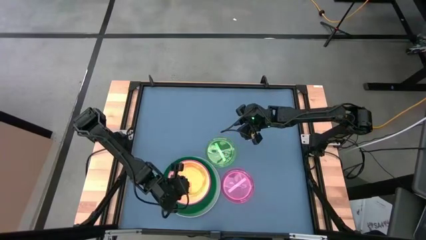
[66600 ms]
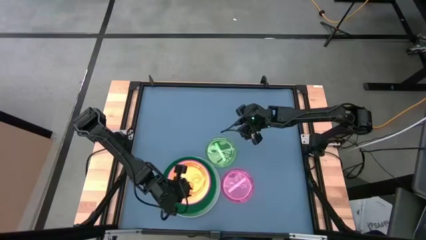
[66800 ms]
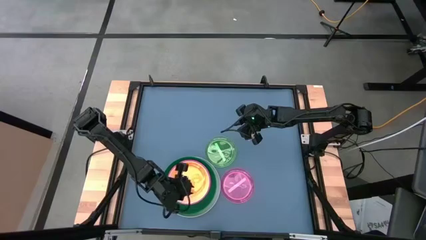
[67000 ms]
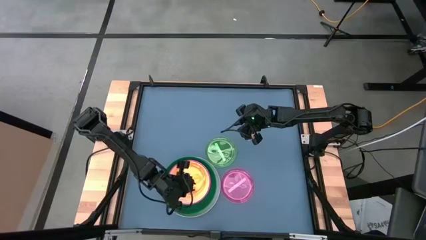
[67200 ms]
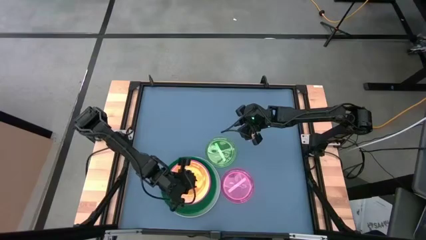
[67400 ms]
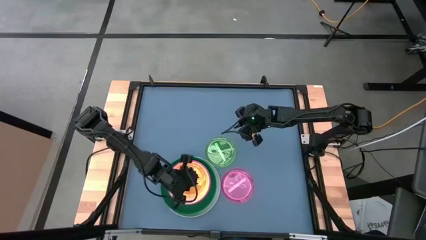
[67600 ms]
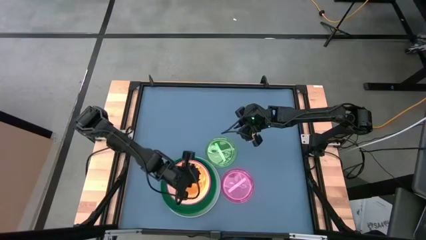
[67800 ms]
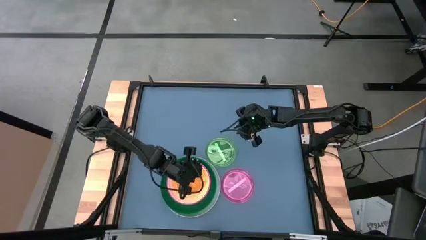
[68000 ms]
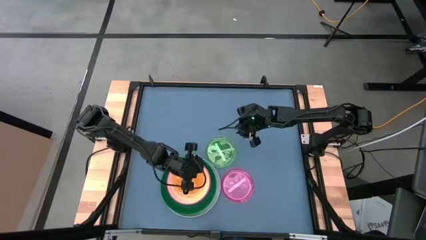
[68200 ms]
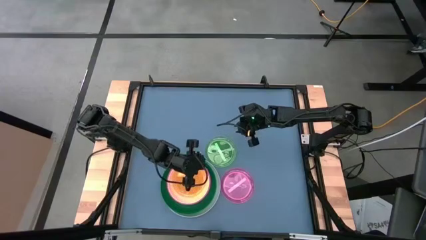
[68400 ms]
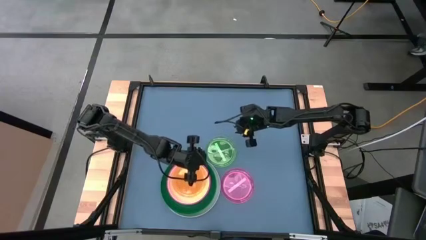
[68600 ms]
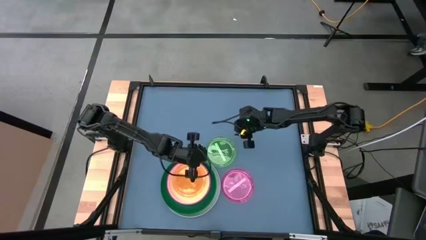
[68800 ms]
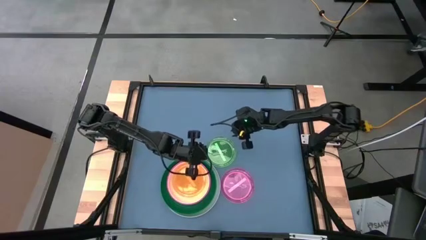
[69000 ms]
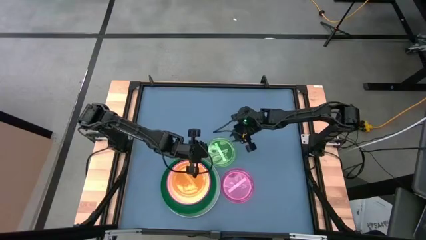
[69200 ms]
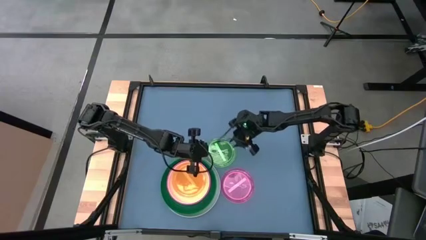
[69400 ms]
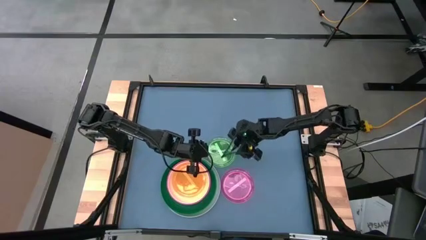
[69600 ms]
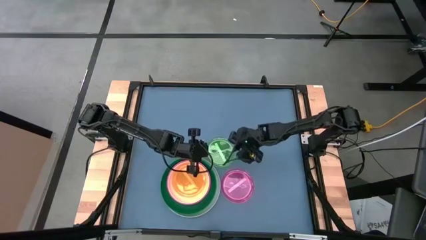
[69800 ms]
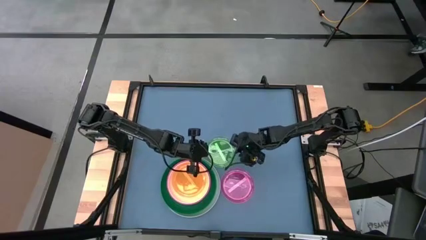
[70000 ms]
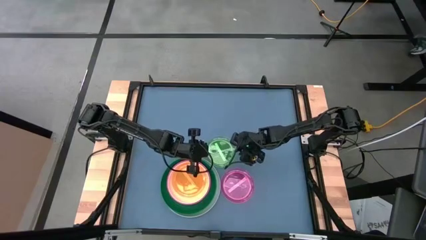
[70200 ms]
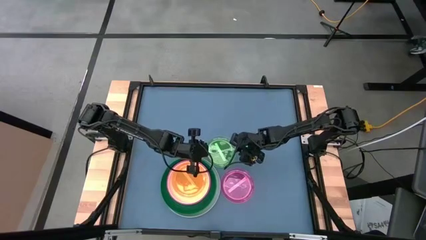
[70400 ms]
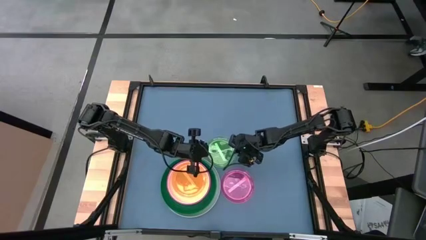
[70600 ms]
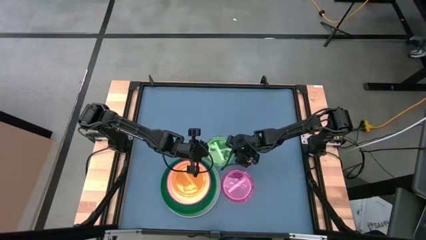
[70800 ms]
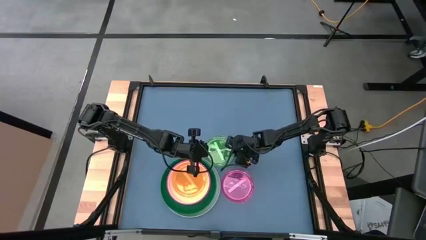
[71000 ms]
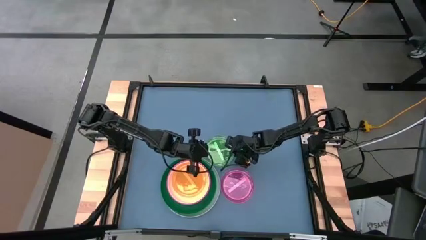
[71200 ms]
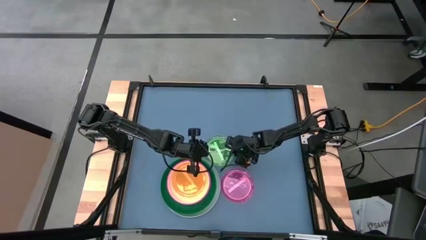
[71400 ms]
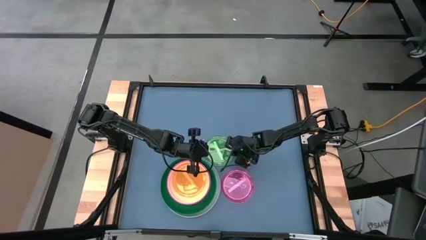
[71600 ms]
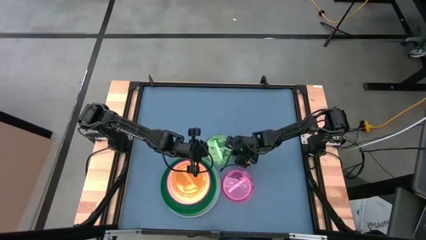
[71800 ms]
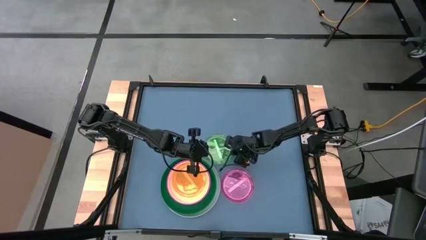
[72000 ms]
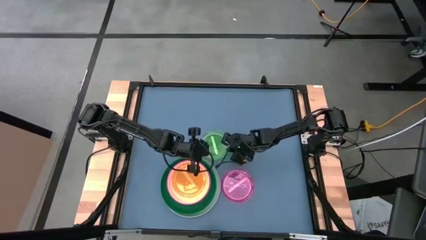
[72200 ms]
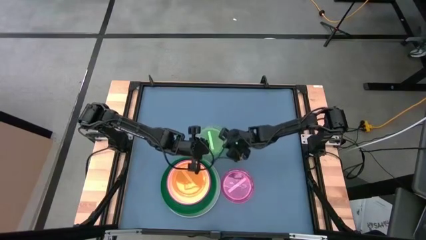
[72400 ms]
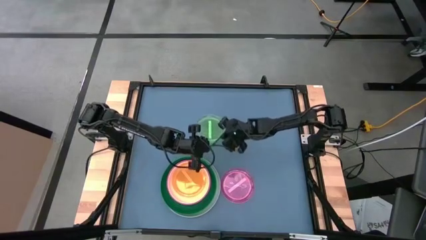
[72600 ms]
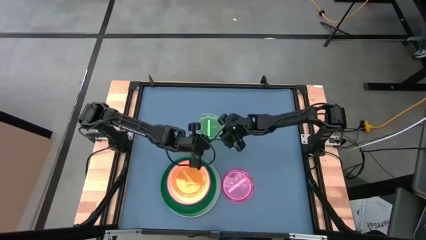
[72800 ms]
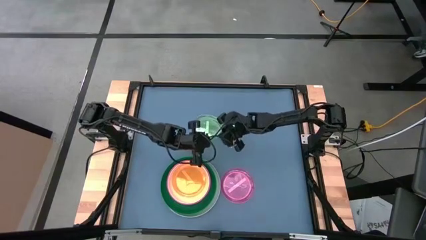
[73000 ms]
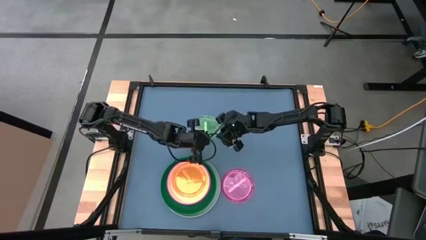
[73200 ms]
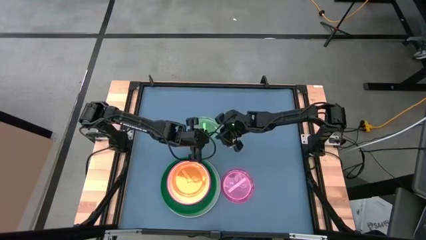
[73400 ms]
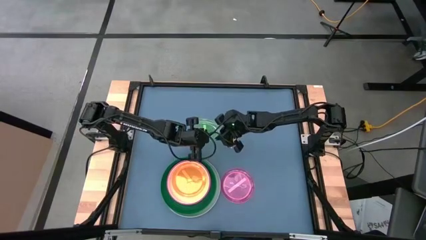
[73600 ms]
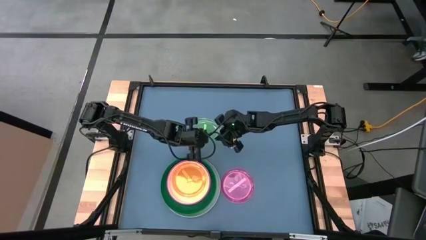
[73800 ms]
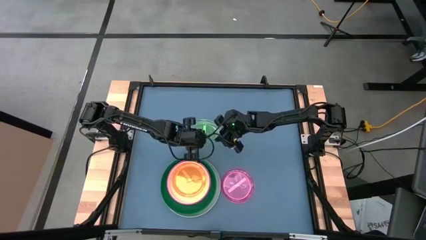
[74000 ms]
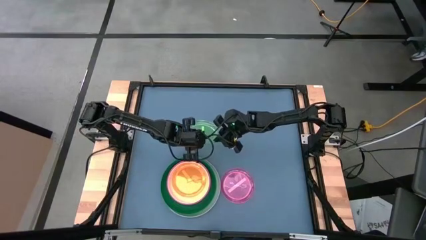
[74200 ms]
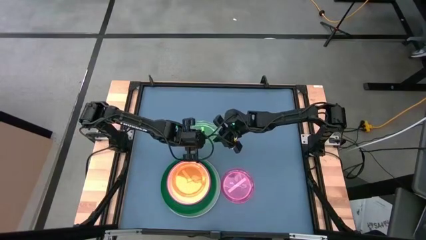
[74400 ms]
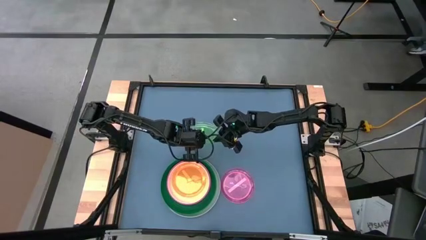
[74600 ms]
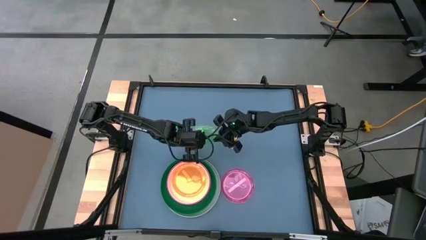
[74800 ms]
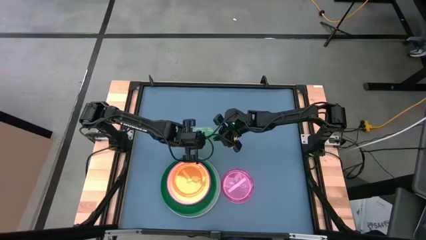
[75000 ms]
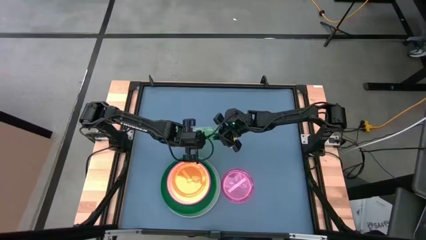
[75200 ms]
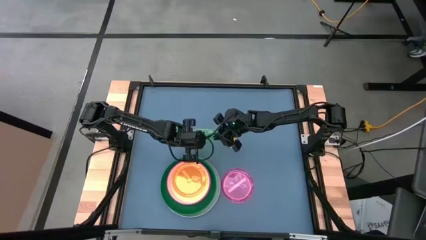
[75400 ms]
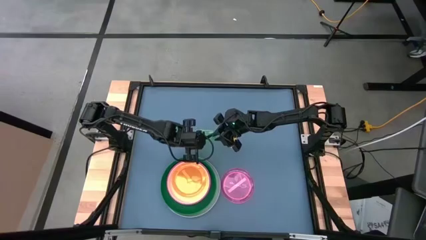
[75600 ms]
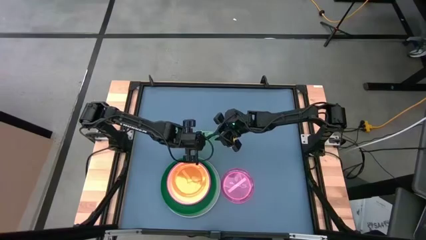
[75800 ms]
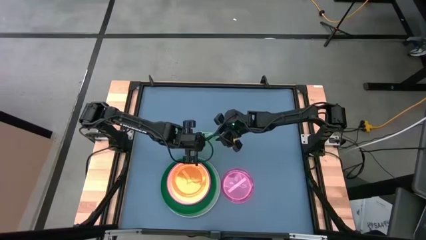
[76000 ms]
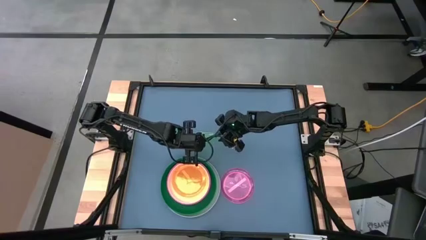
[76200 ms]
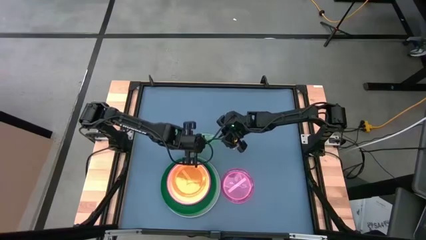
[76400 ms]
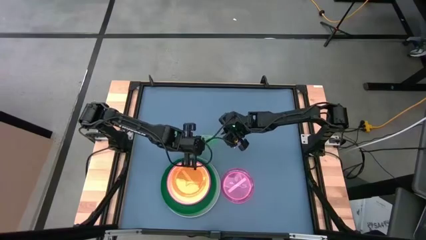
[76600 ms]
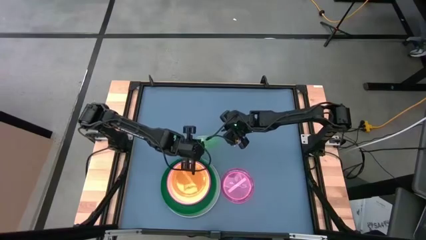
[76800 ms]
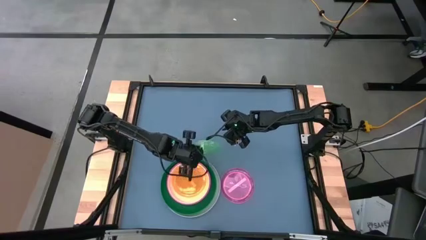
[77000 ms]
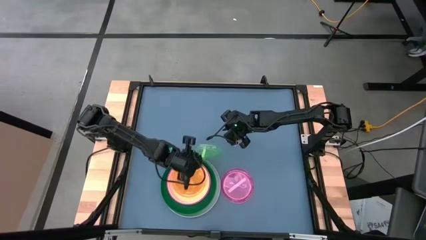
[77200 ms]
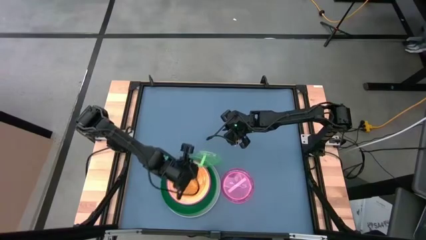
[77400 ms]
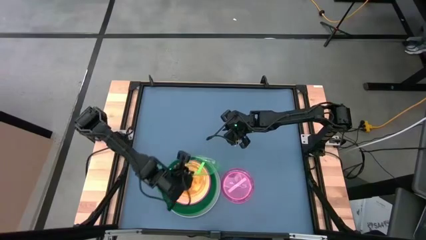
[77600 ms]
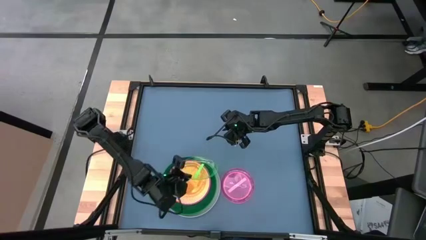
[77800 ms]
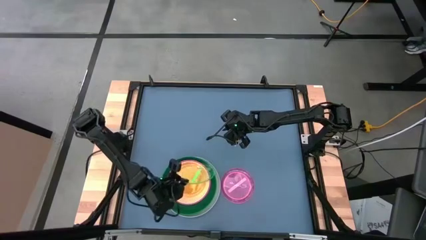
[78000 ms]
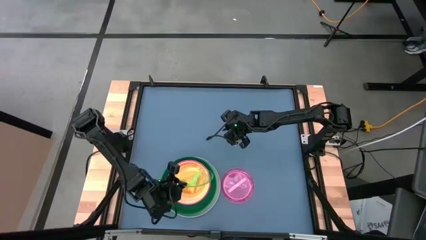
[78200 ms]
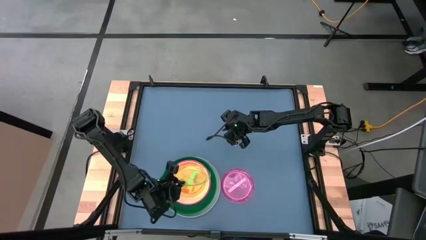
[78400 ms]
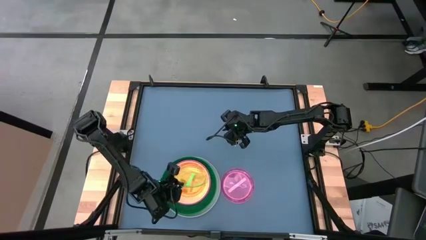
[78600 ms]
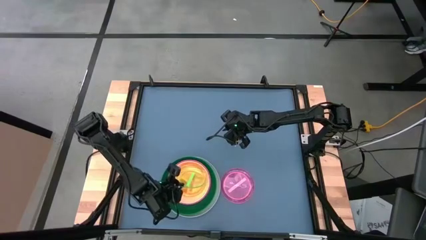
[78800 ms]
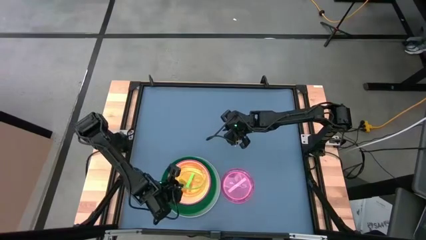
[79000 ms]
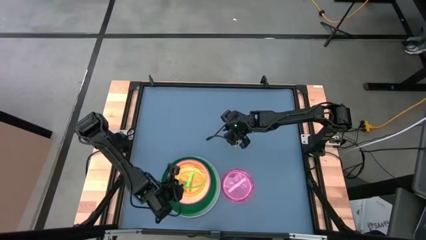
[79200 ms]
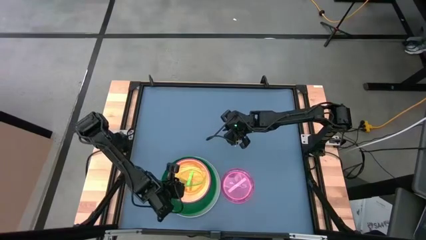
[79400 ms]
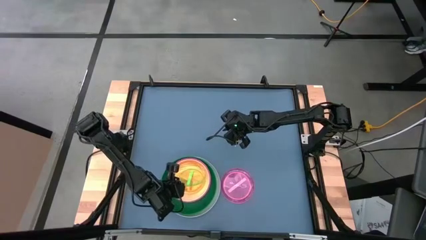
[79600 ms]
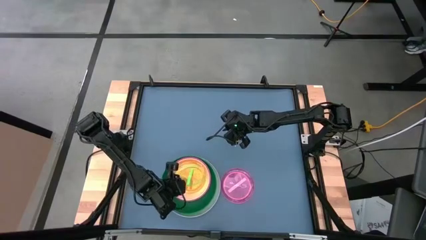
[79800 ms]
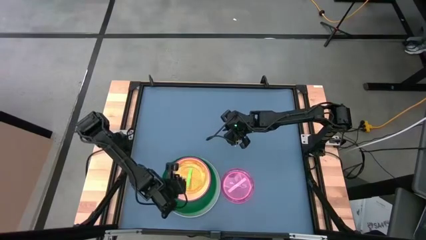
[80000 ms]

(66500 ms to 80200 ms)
Task: Stack plastic plates
Stack the light green plate on top of the orange plate

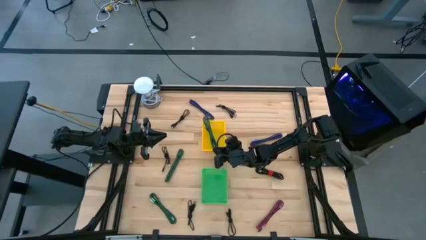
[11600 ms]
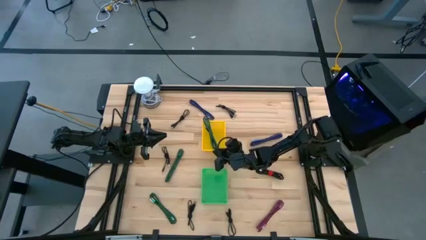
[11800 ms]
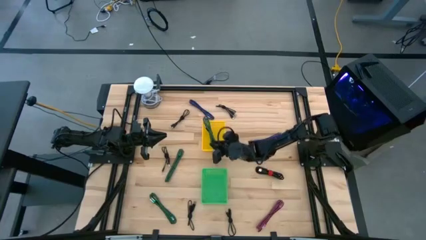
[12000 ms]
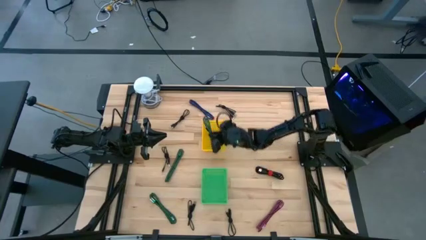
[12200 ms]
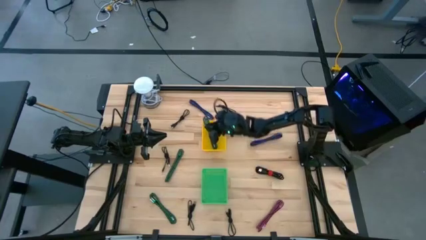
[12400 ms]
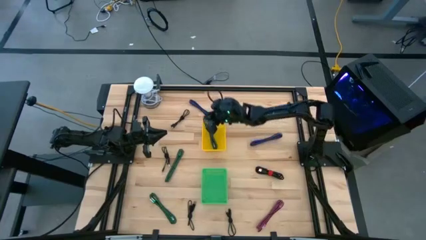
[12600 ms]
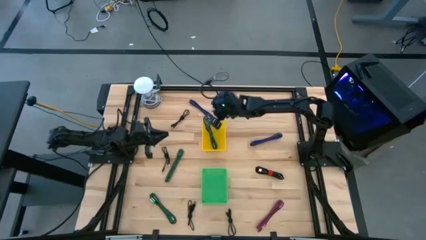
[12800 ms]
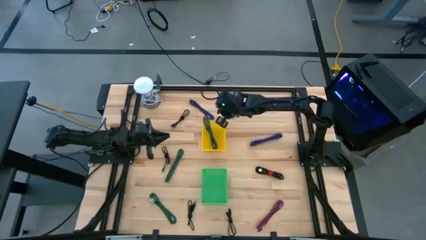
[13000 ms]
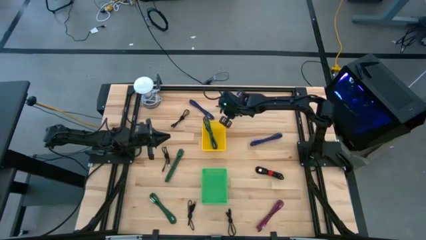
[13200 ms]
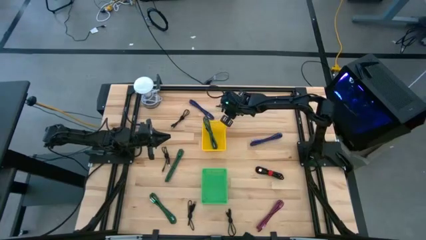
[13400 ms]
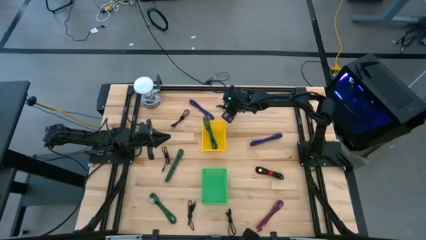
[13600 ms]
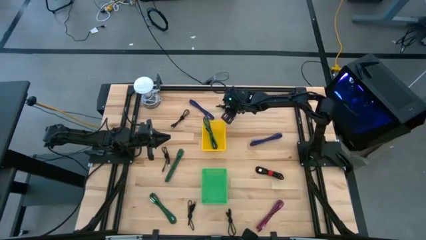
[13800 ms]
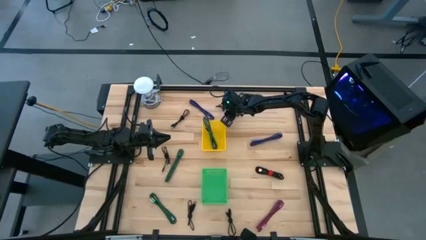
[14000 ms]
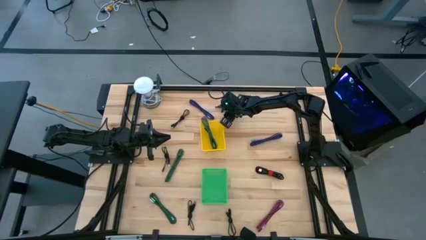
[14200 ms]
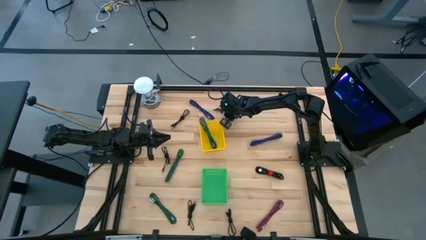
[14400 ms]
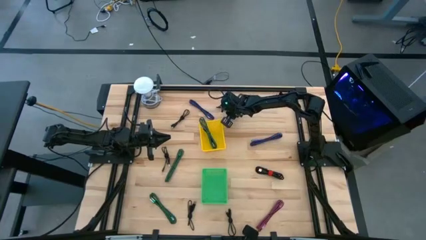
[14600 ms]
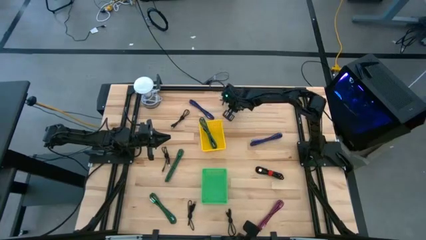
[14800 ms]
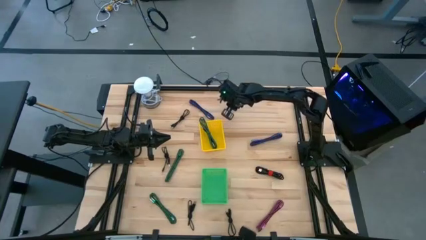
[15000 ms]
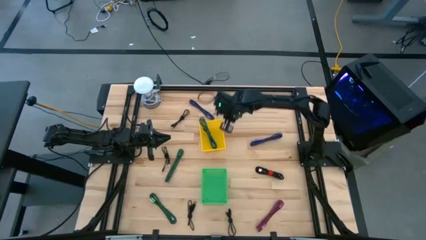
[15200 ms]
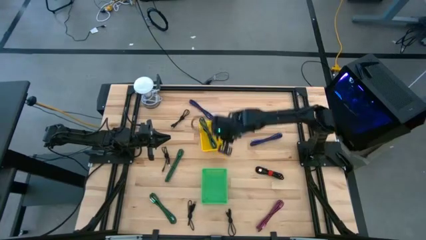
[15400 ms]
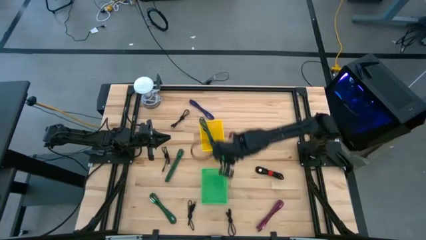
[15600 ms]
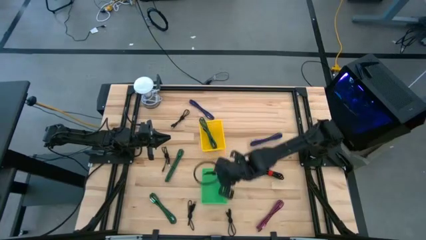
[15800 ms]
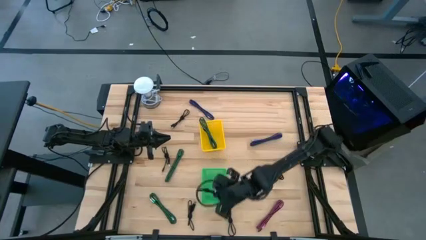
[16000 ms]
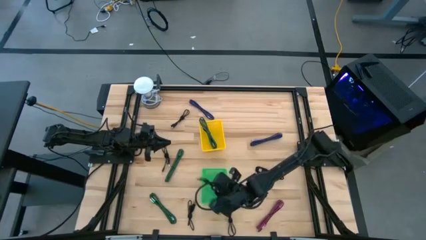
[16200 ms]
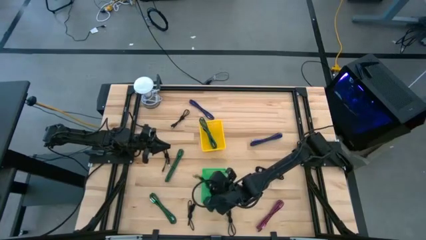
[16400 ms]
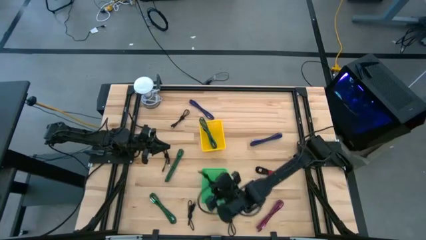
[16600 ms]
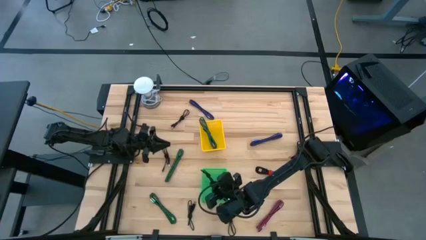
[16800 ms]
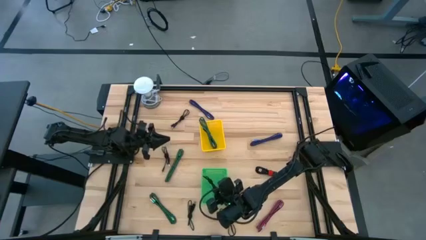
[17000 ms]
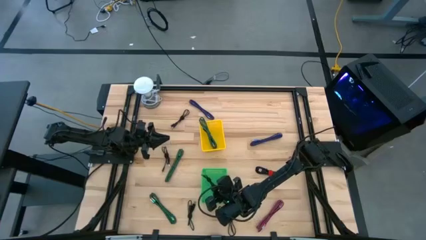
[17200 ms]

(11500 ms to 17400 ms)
Task: Pick & Place USB Port
Put the black charger cable into the green bin
